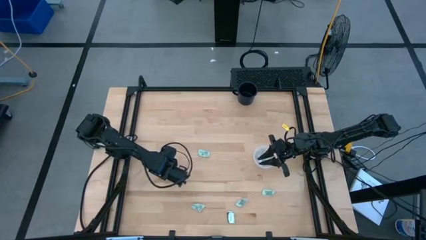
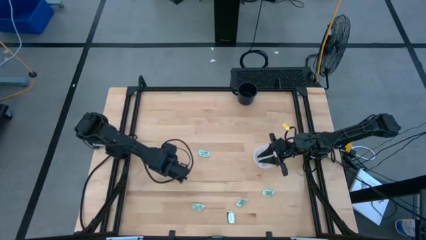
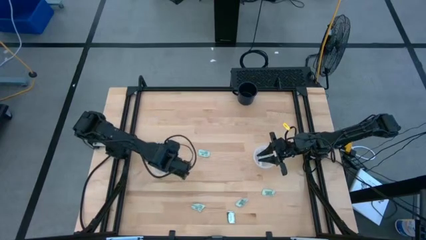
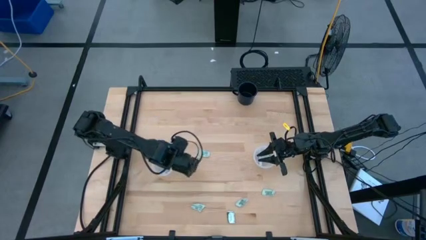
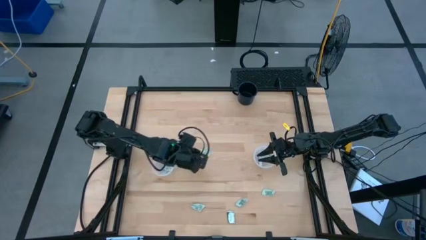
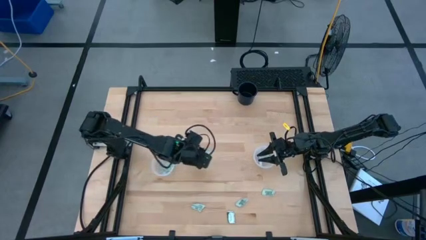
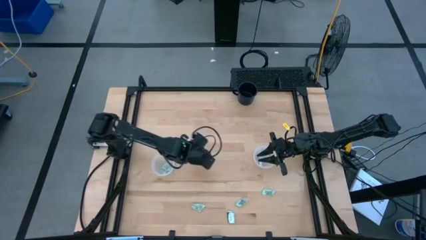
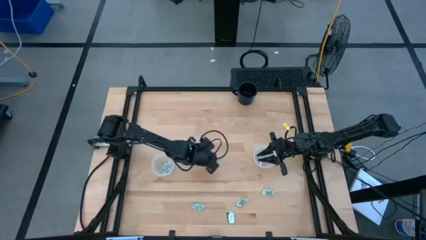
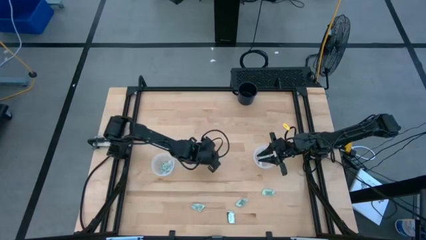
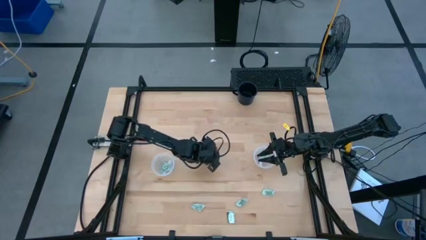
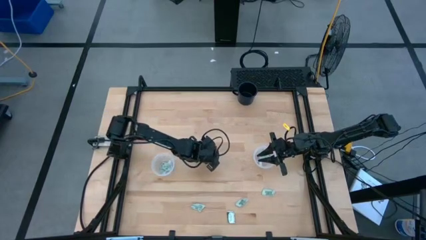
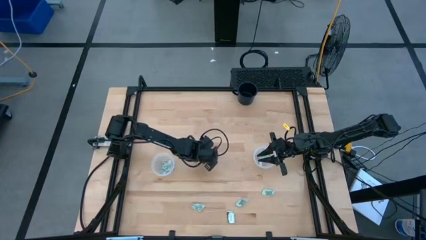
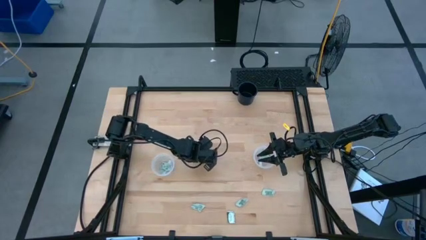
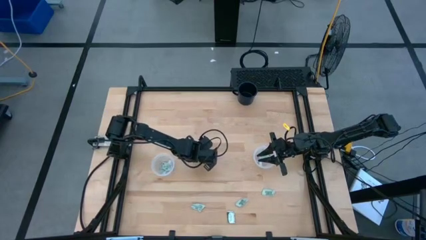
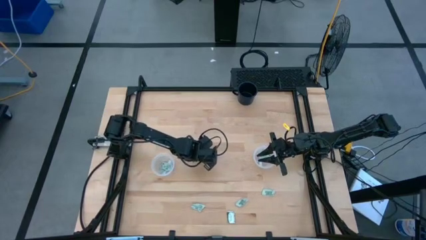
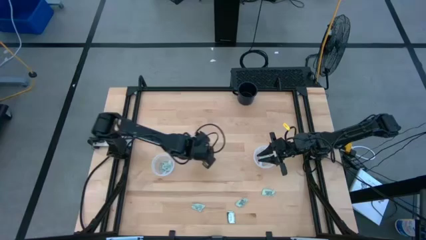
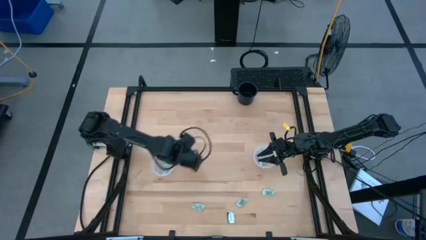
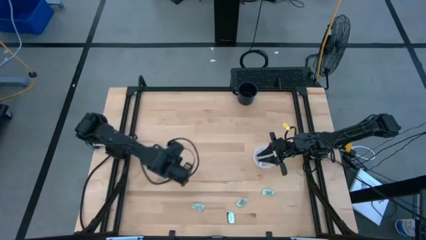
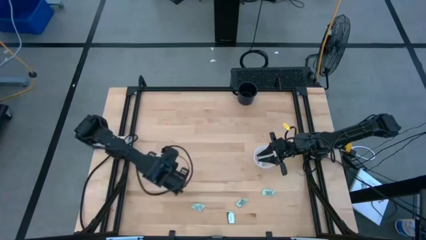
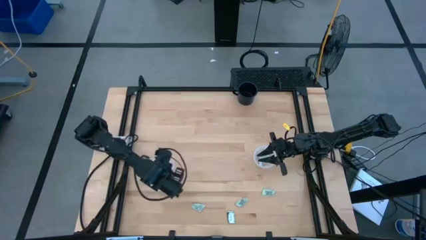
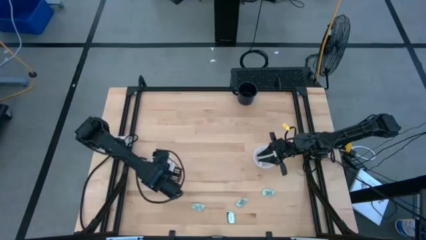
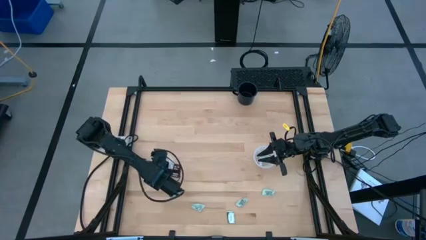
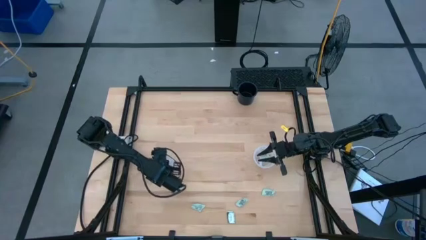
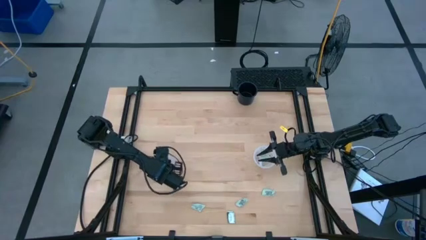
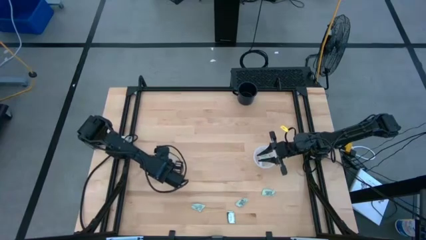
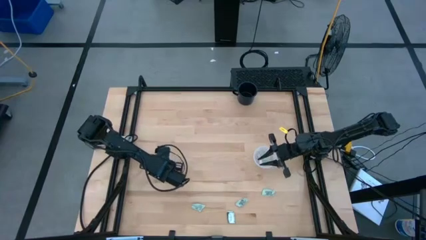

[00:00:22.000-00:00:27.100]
Task: Pick and place items into bin
Put the stevia packet into the left transparent bin

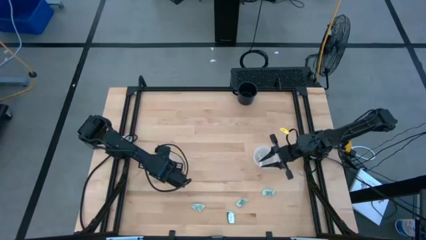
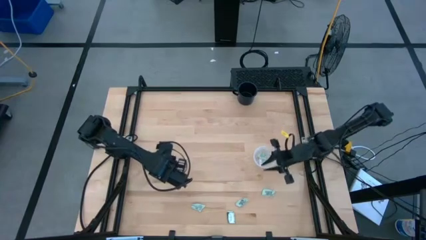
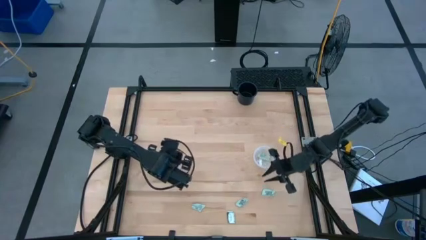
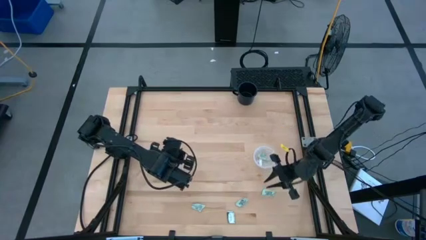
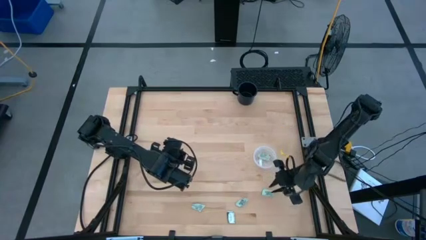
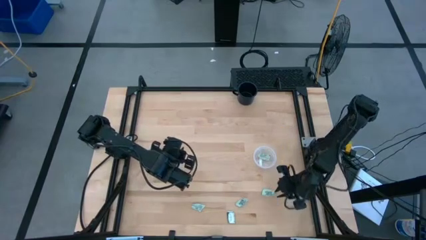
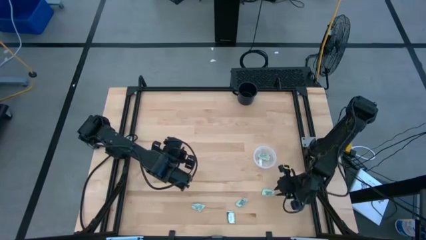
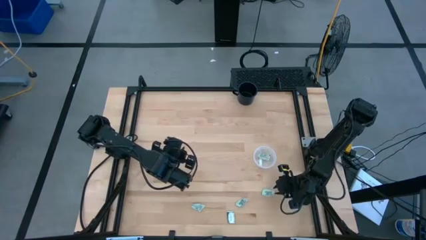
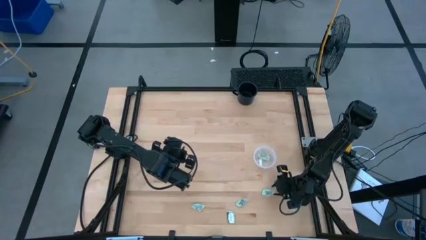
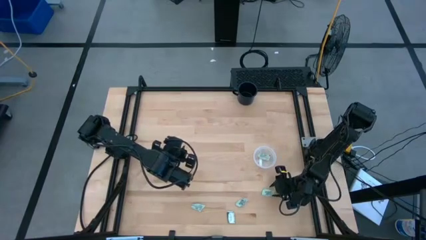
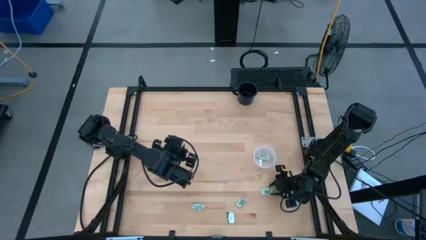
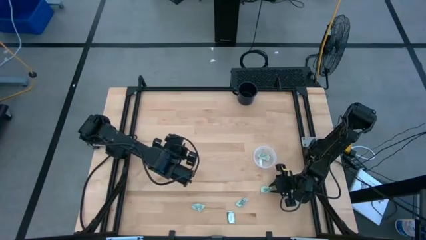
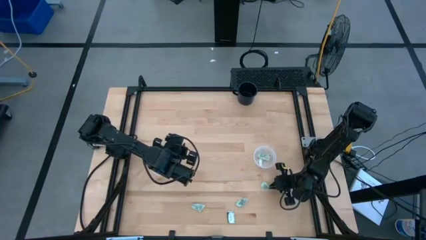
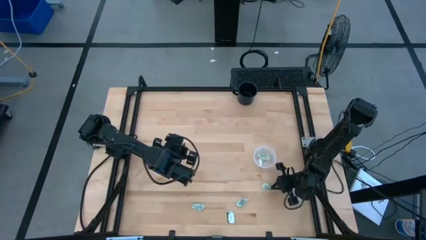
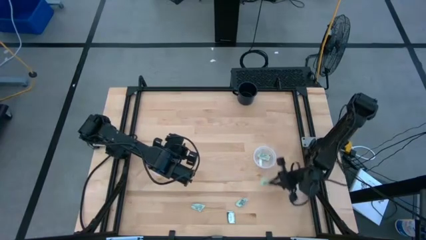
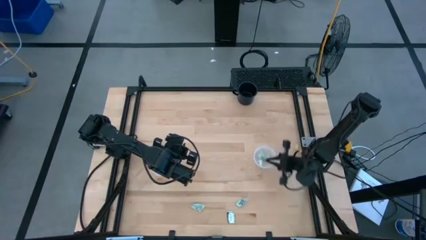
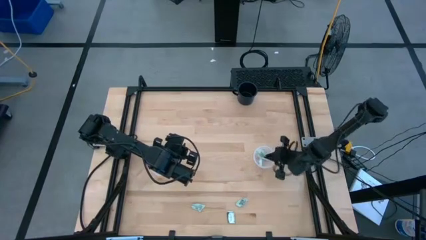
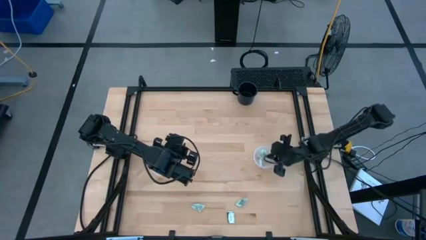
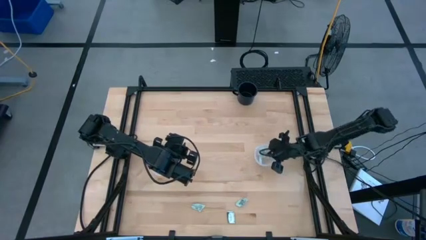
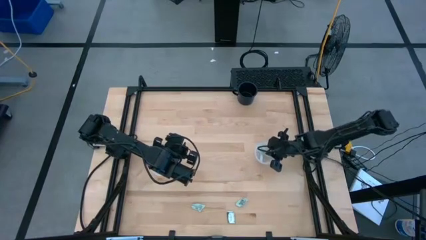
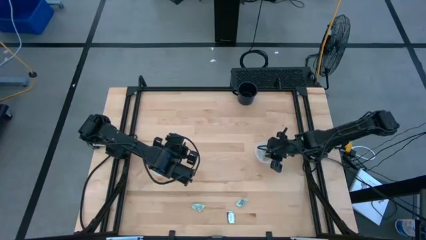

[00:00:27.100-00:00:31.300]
Put the stevia packet into the right transparent bin

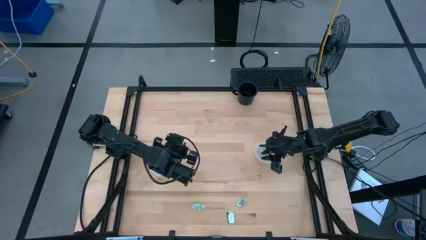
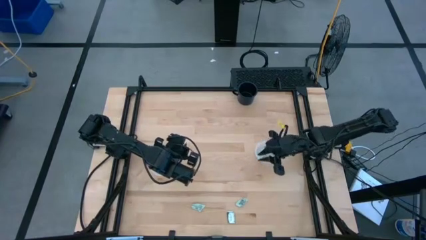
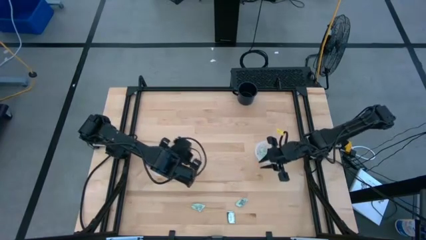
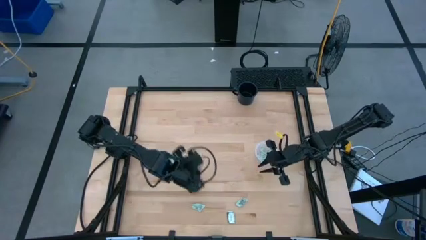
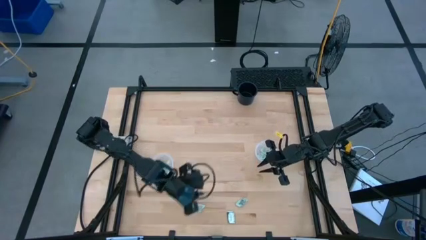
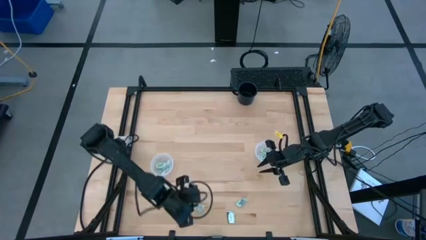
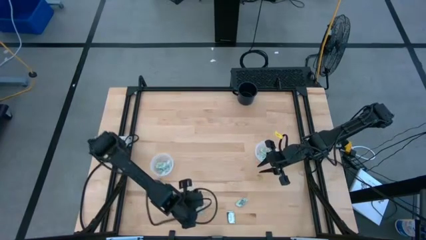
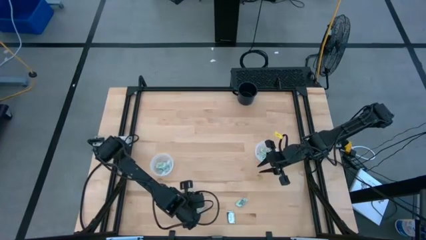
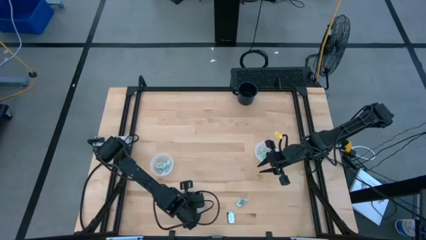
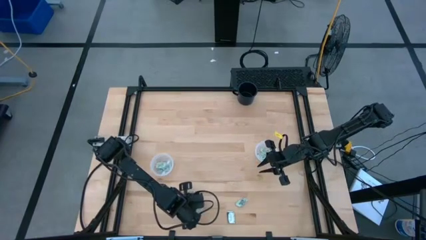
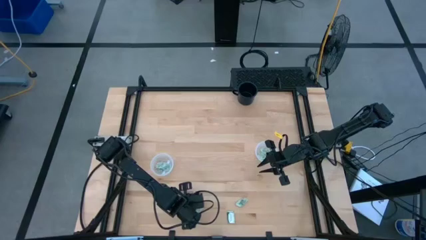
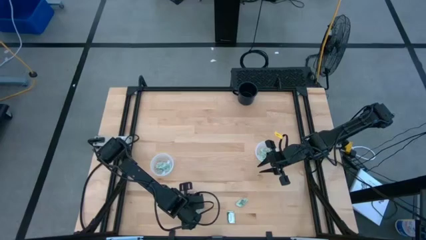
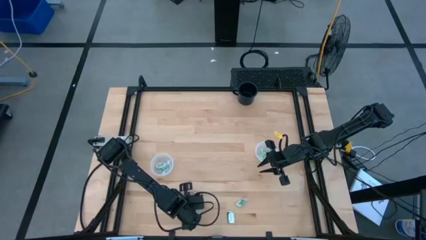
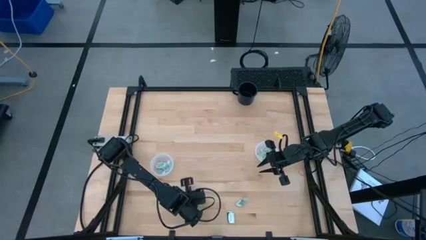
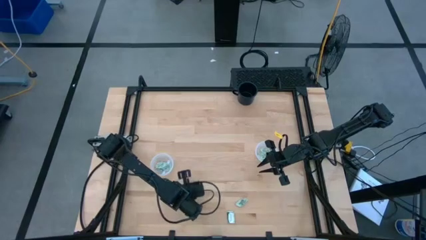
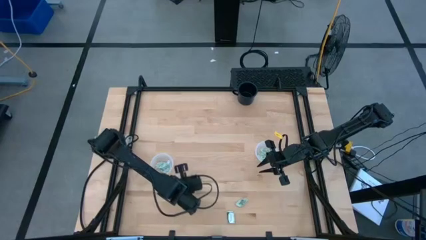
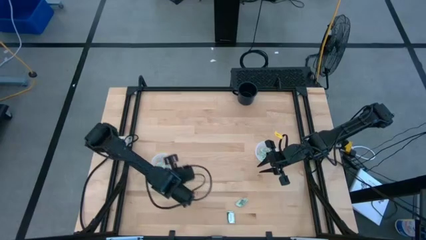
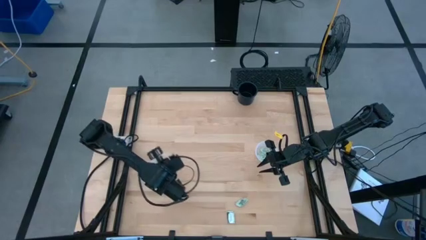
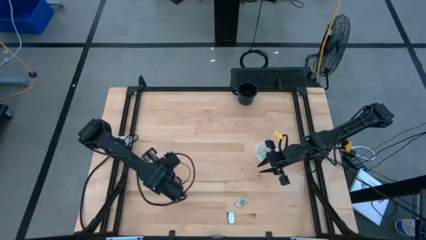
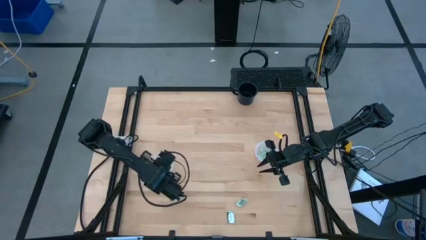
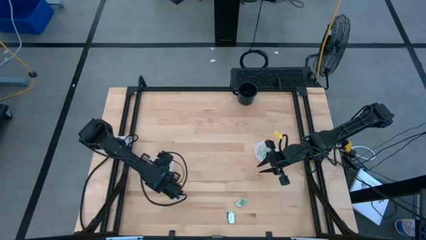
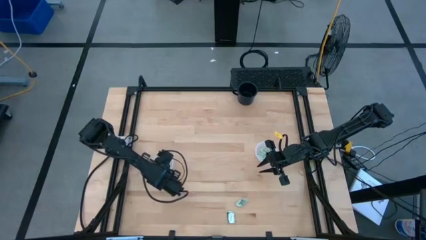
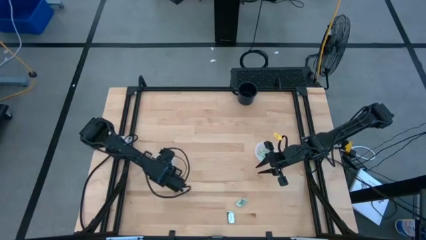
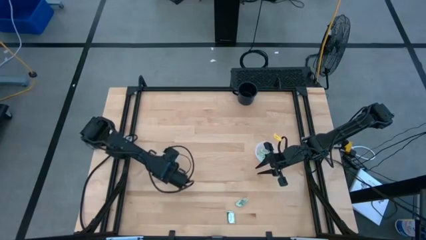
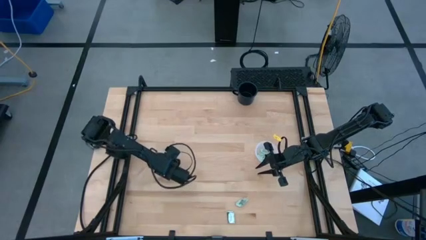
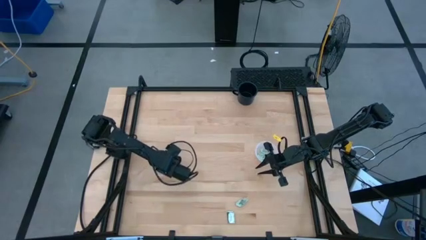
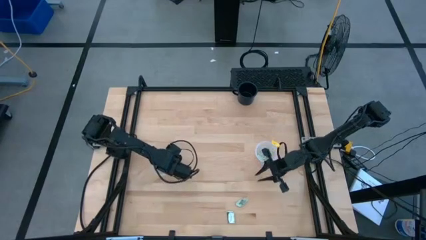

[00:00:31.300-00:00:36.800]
Put the stevia packet into the left transparent bin

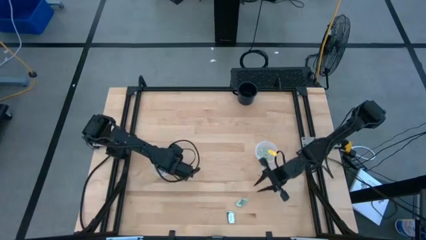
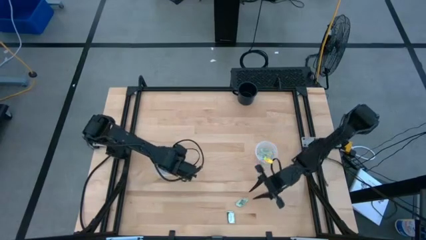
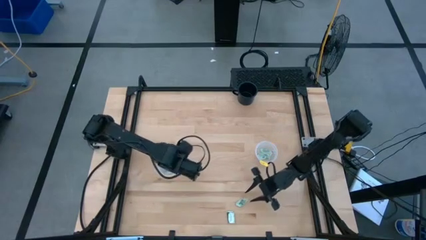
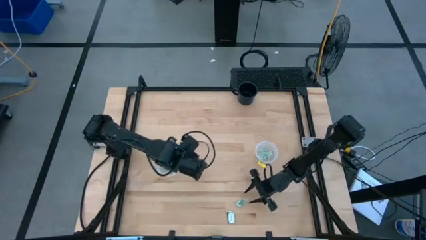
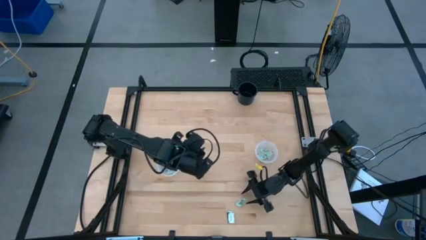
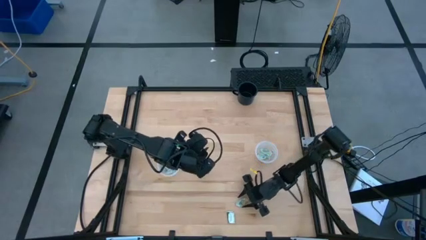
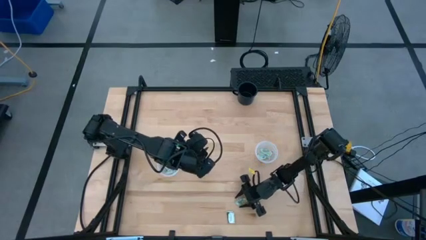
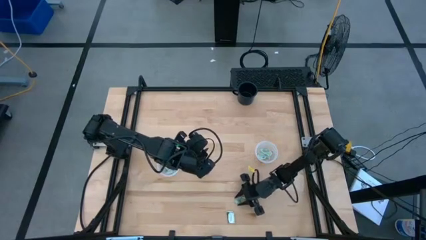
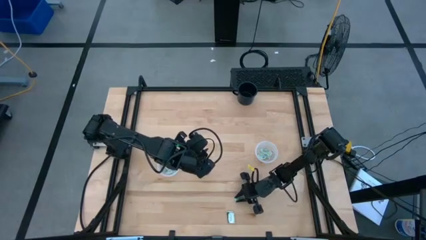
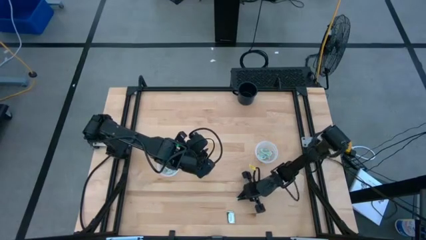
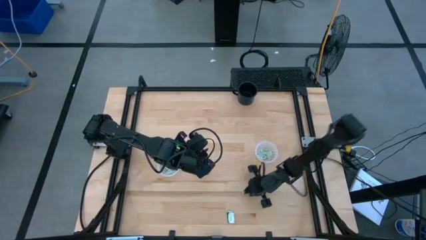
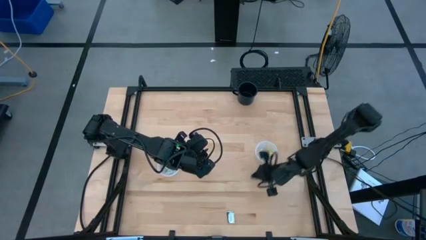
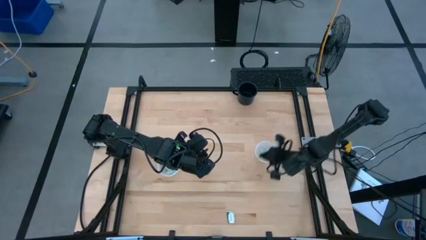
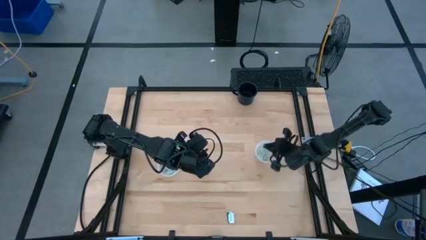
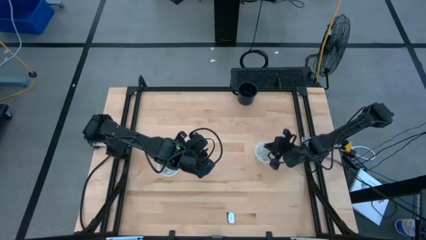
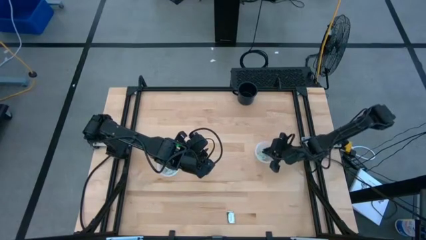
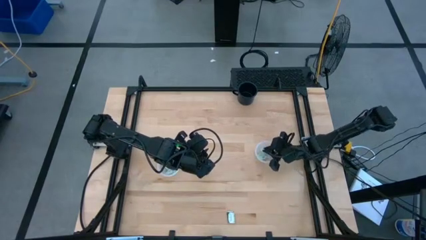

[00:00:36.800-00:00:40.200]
Put the stevia packet into the right transparent bin
